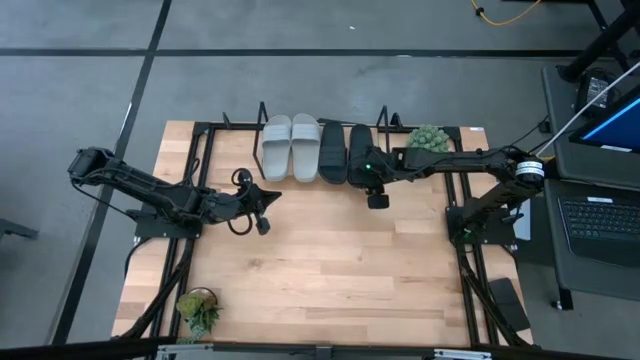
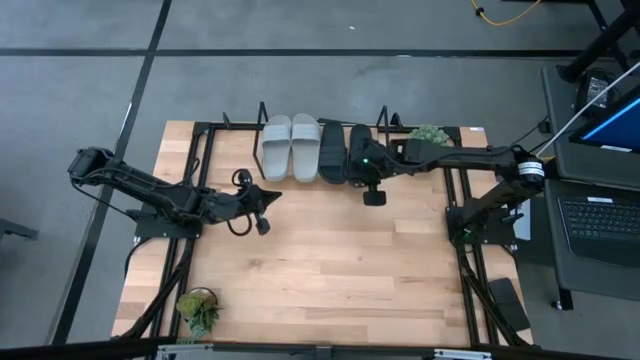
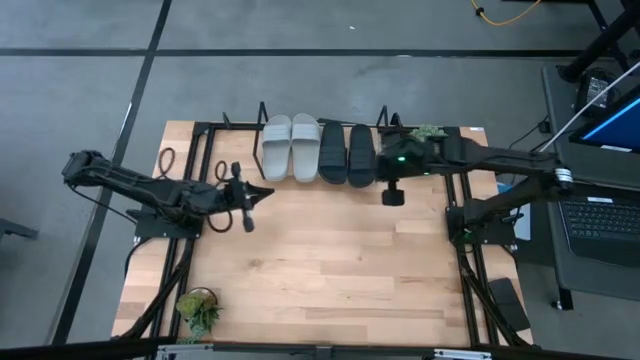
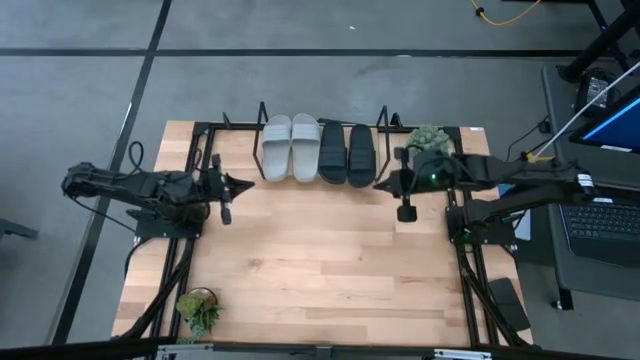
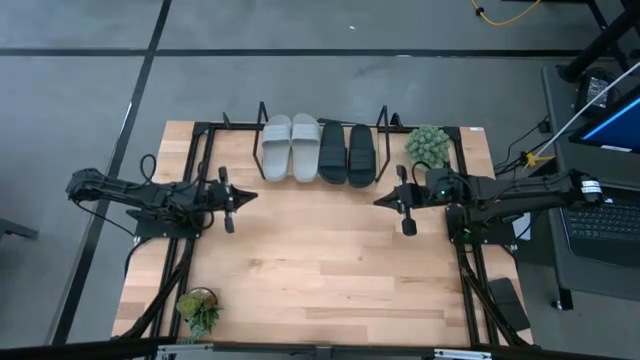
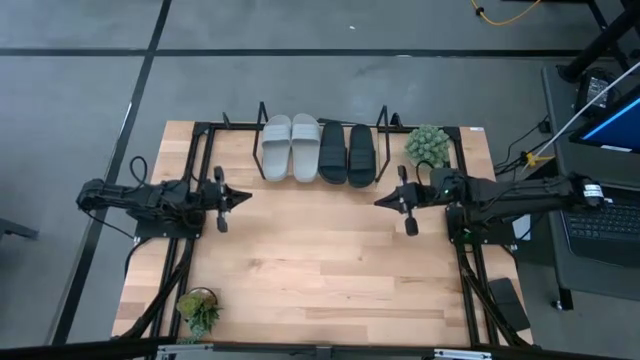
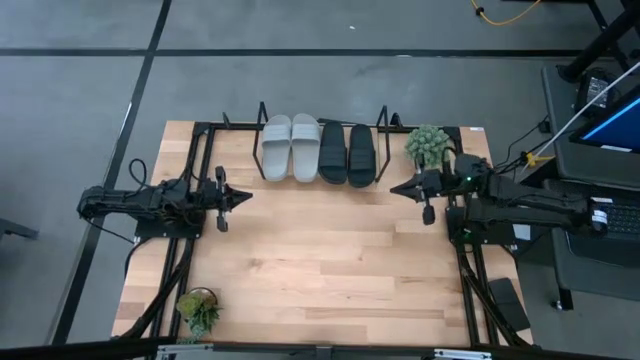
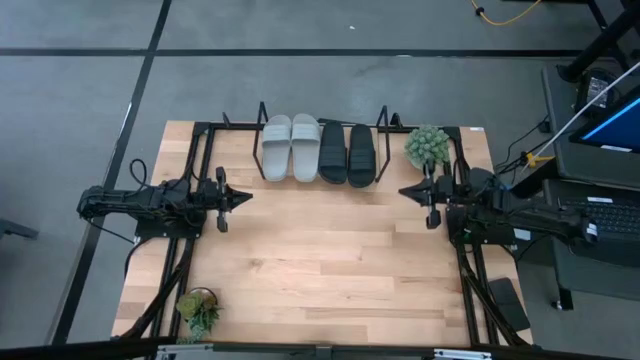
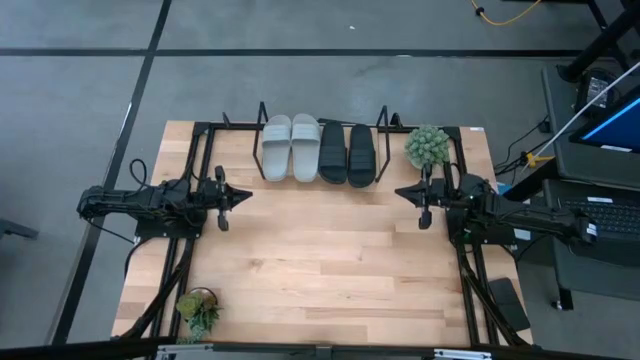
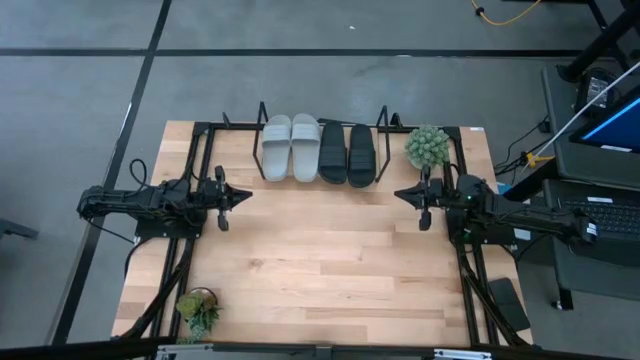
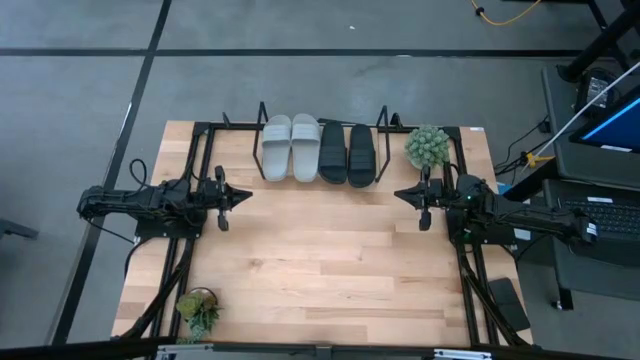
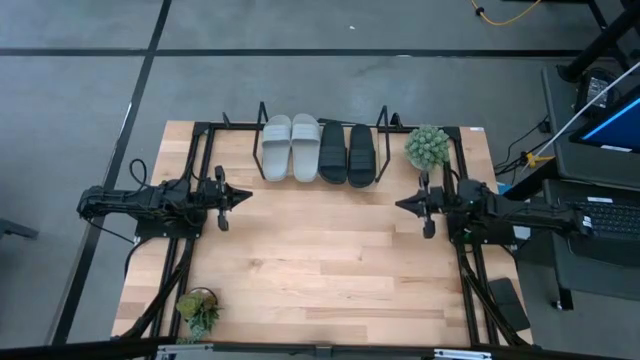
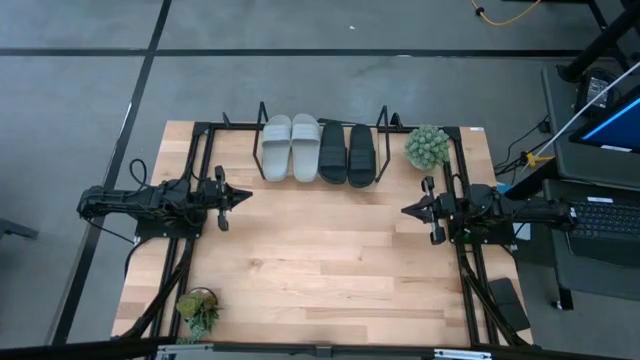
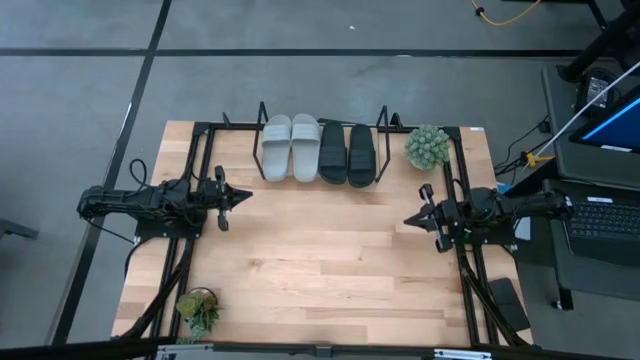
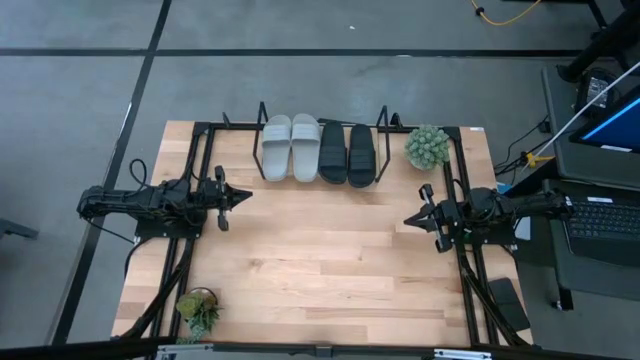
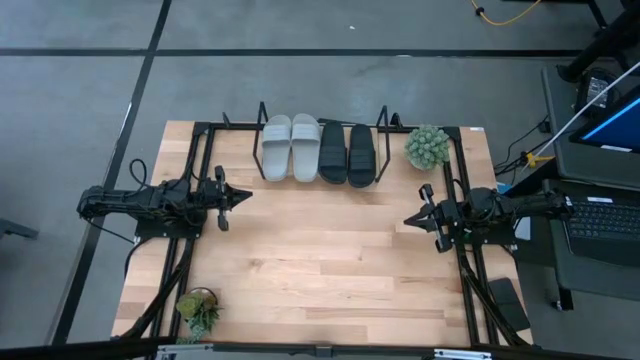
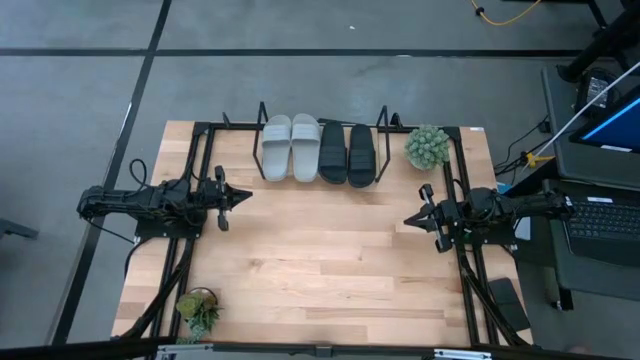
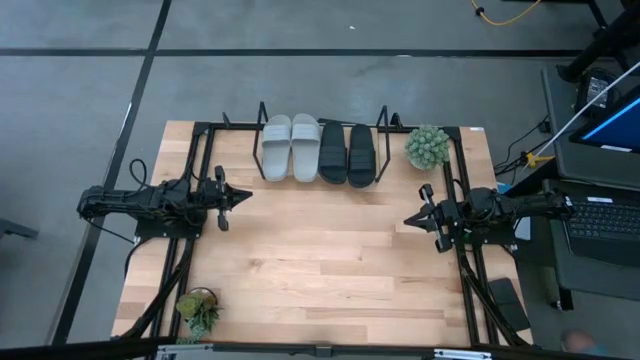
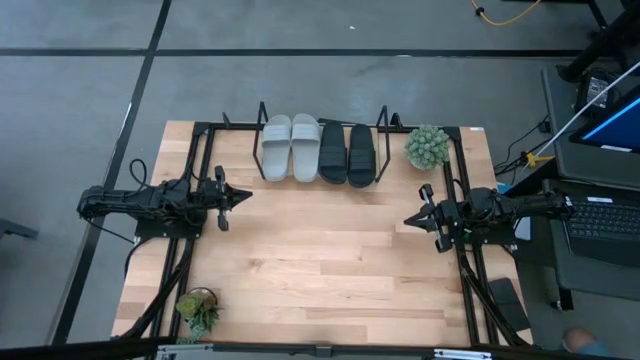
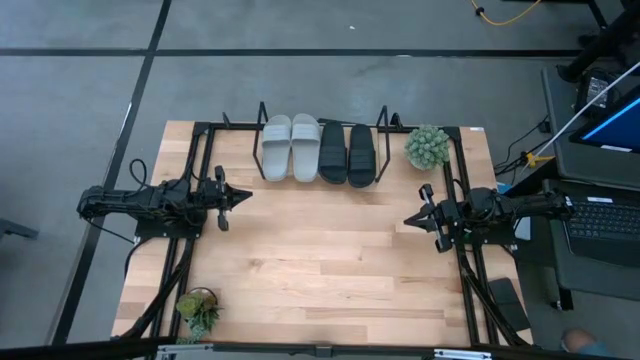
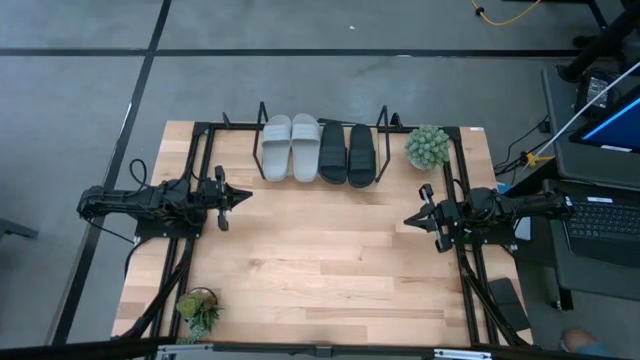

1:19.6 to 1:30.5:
Task: Pick and place slides into the shelf
Return to Home Position

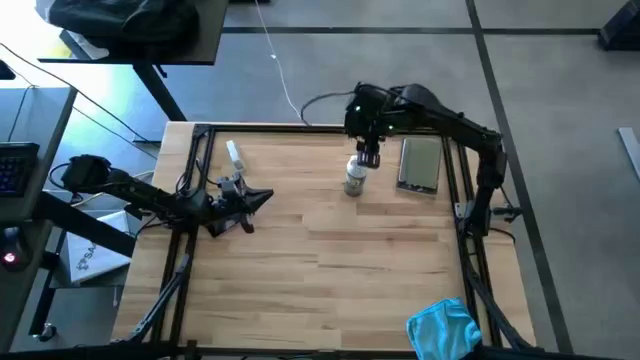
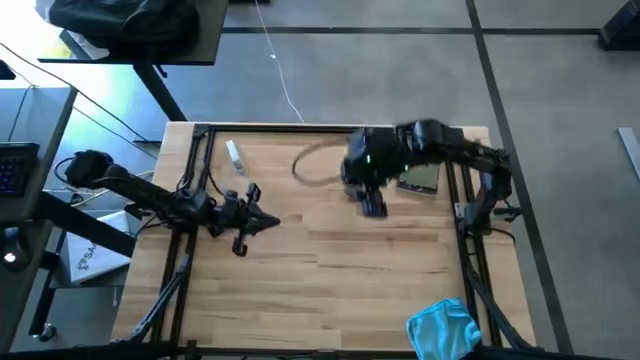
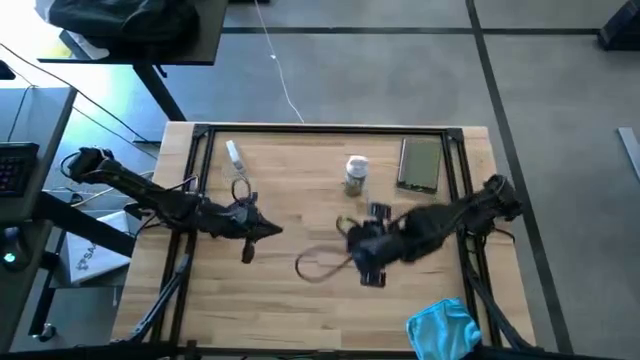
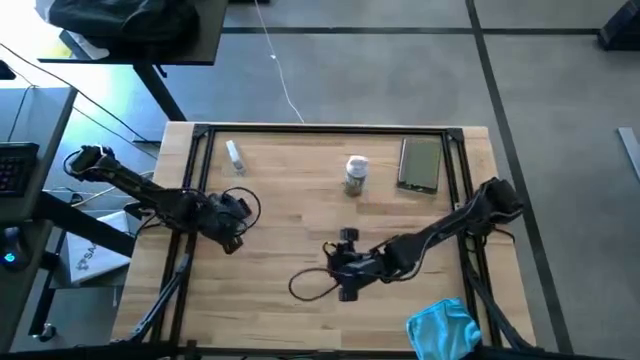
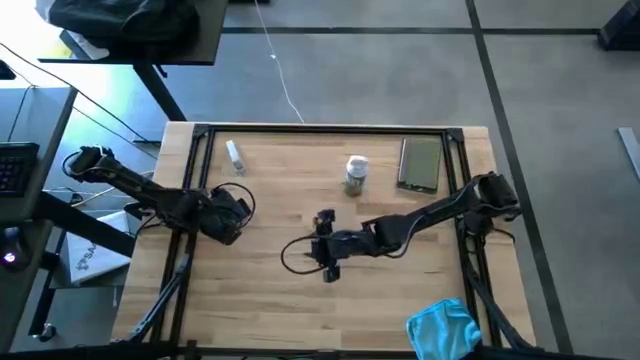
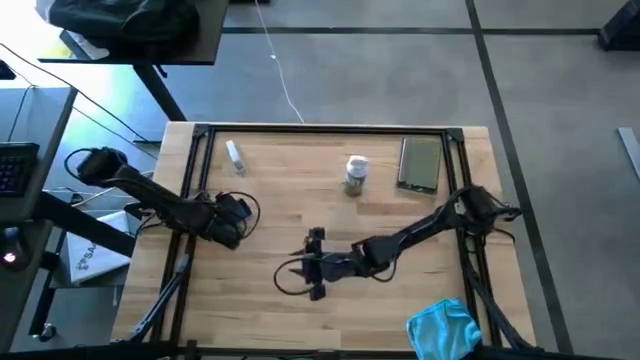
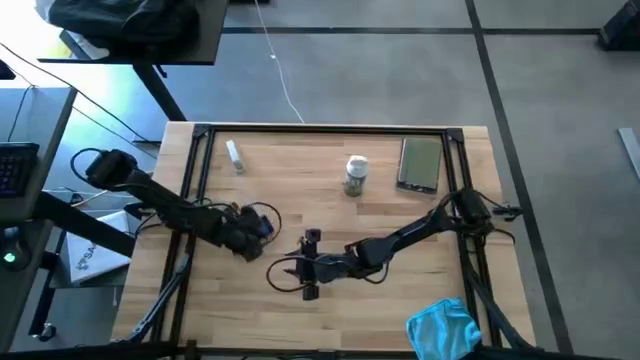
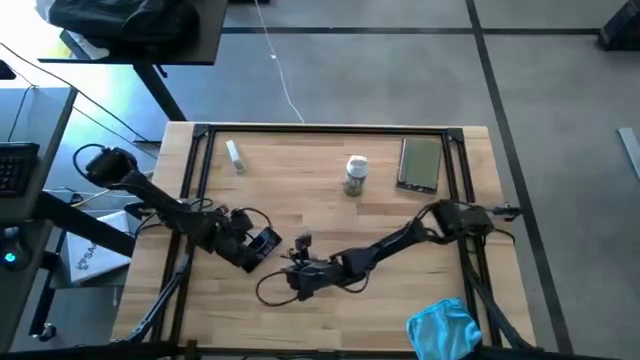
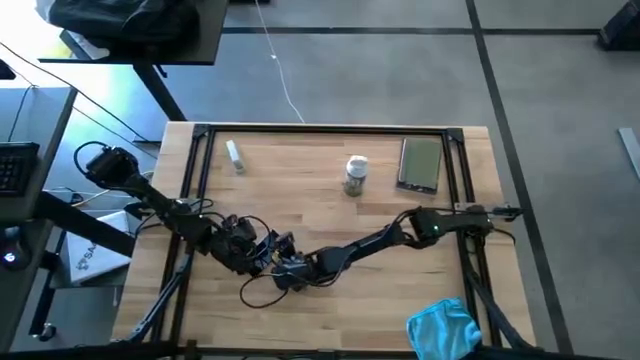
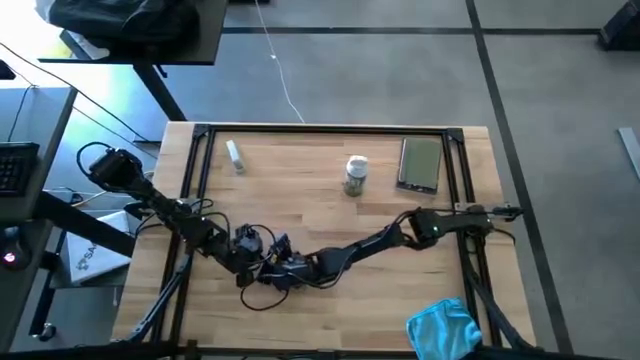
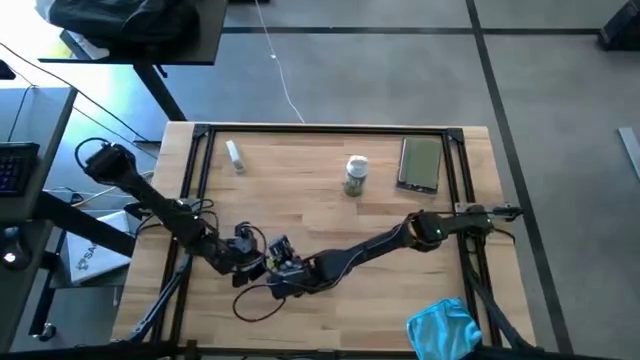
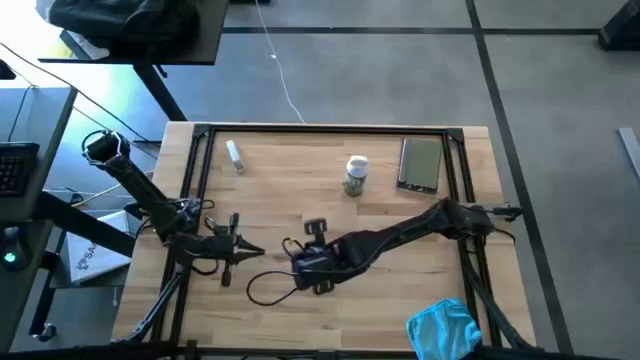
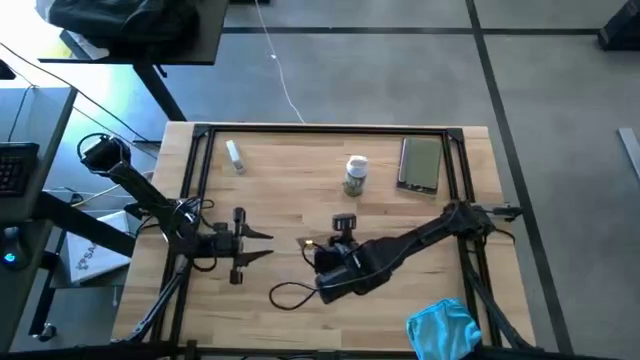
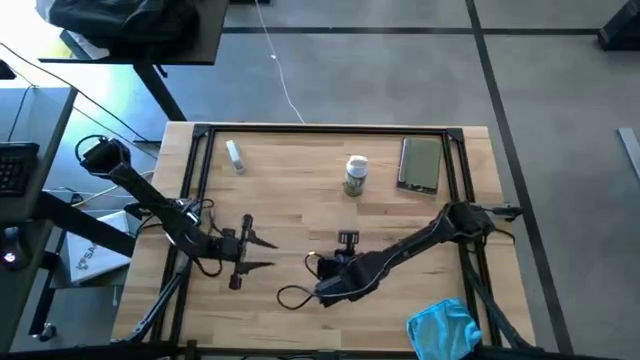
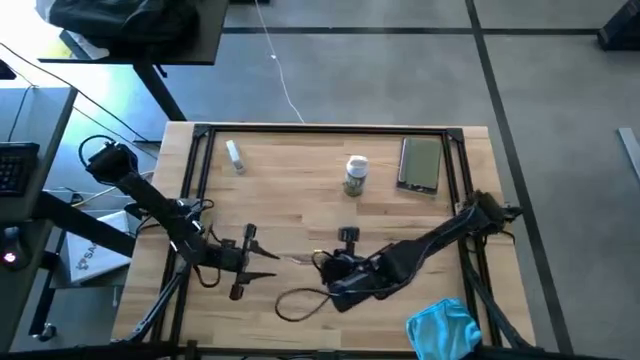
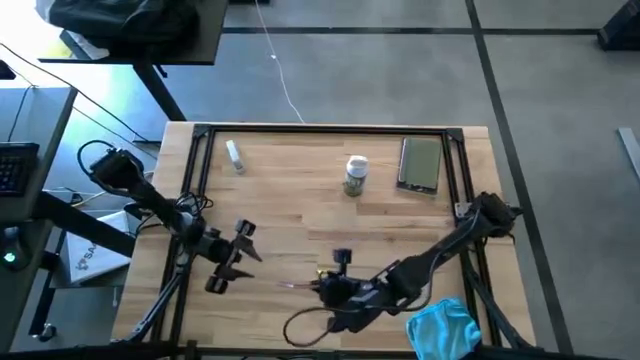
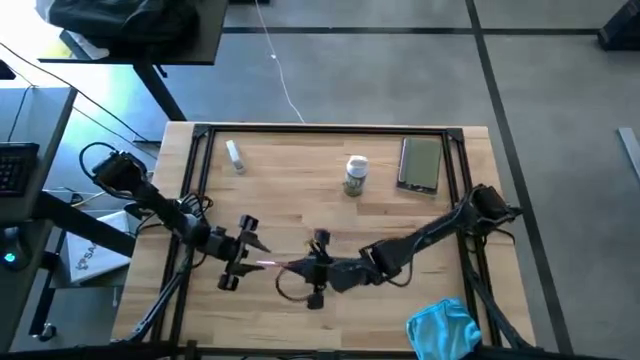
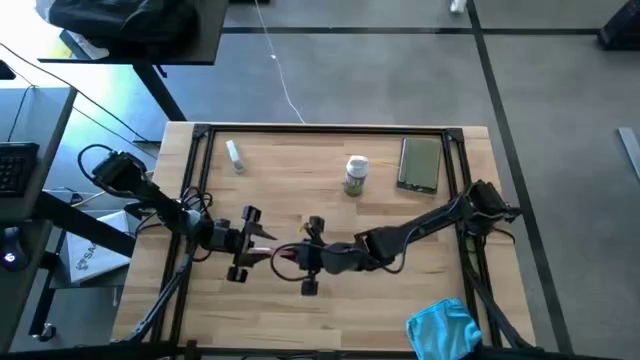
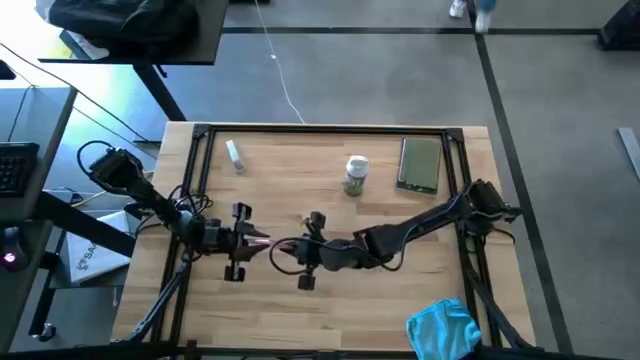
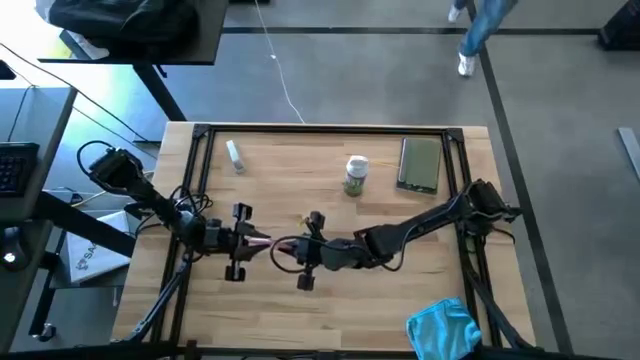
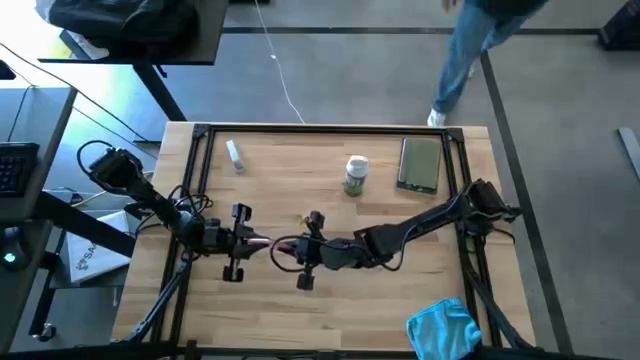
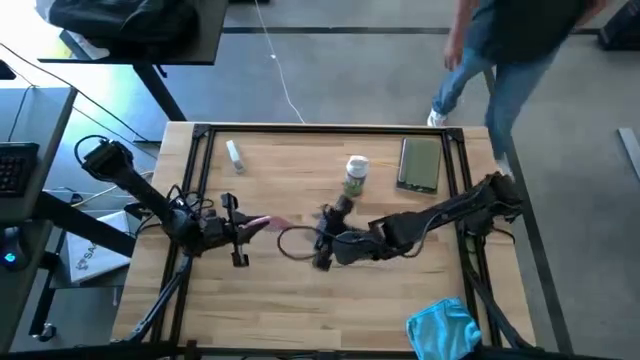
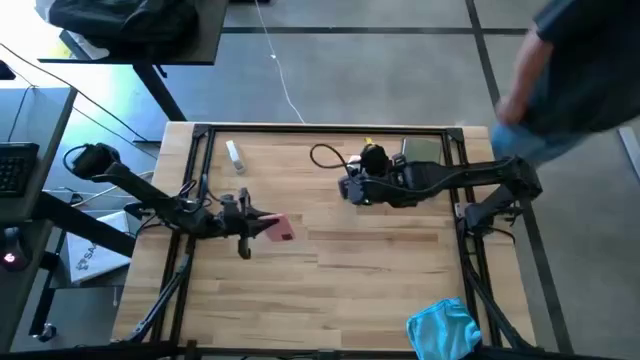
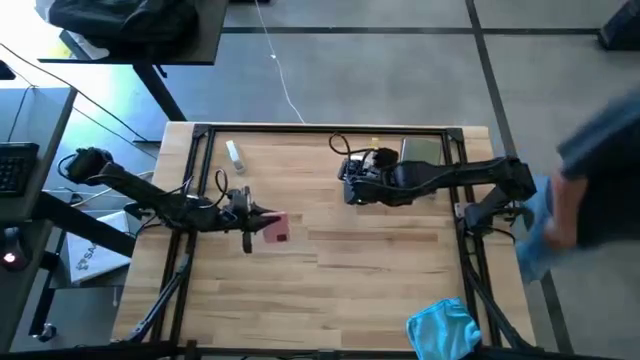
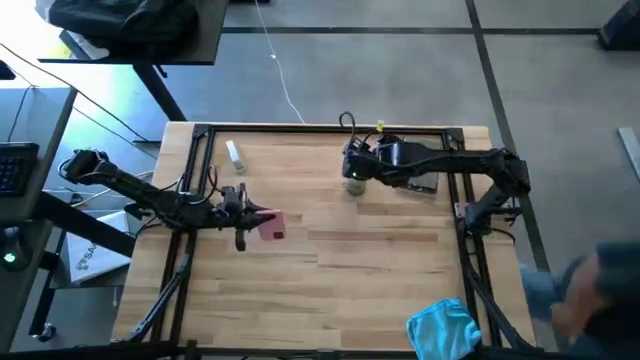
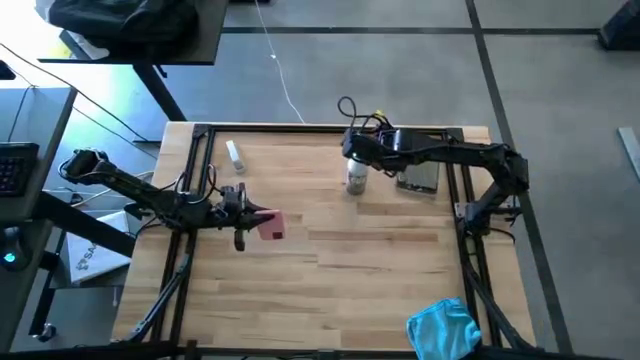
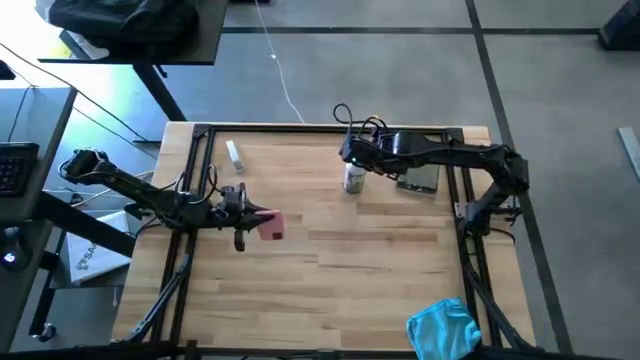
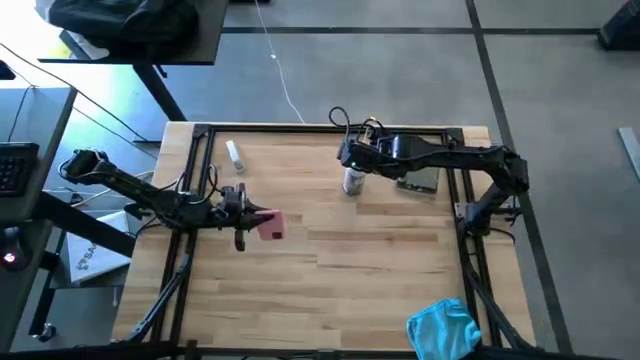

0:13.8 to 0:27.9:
Task: Apply microfiber cloth
Spray the back and front of the cellphone with the spray cleaning bottle
